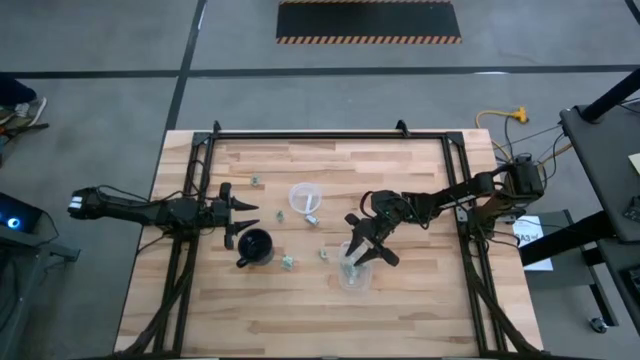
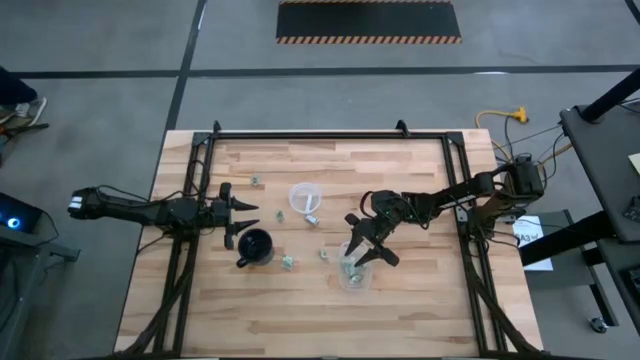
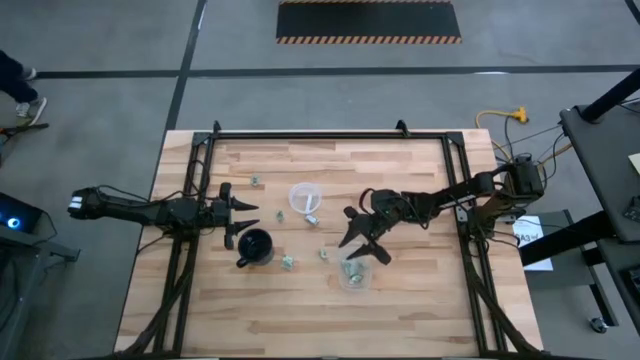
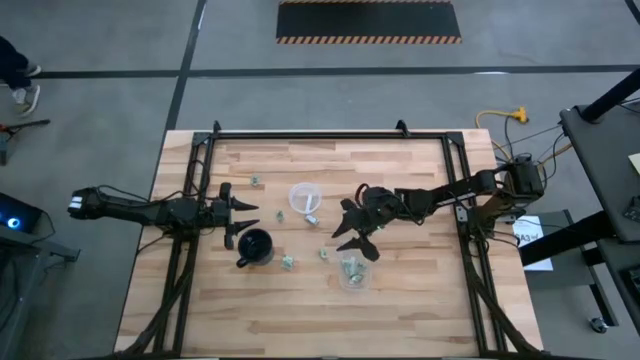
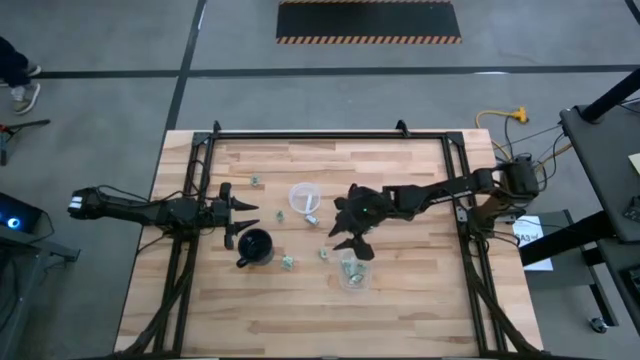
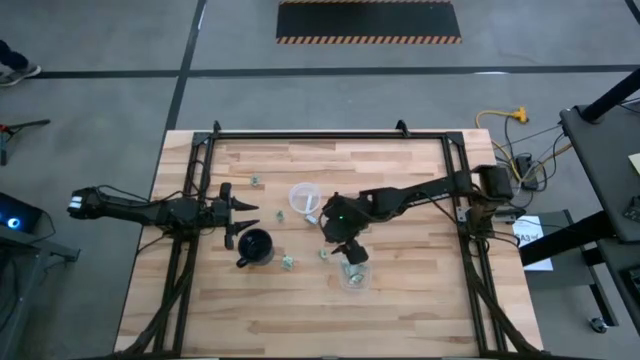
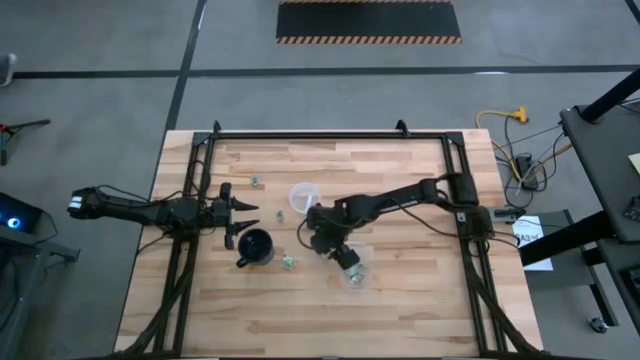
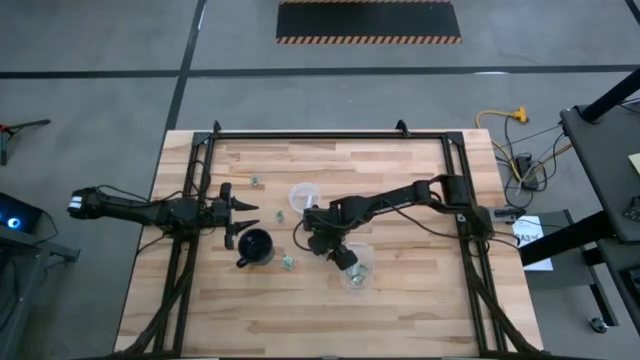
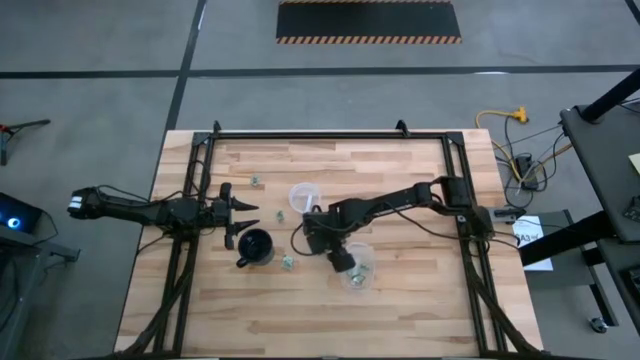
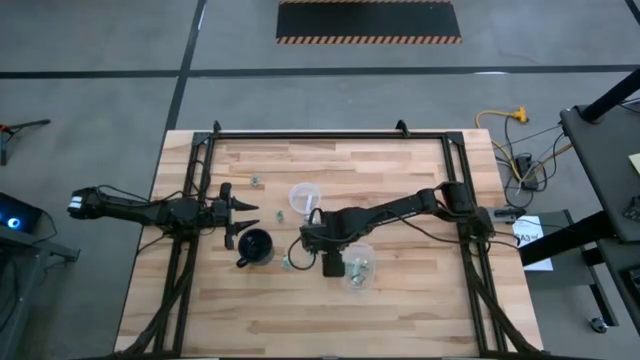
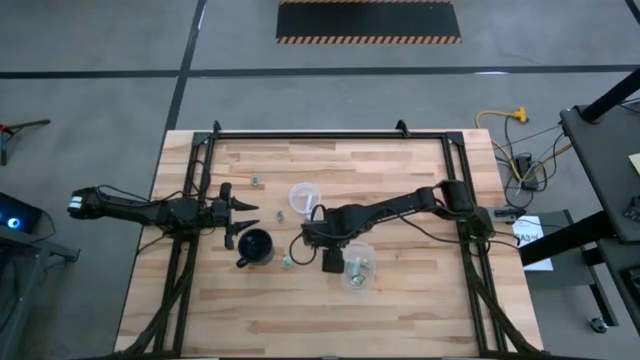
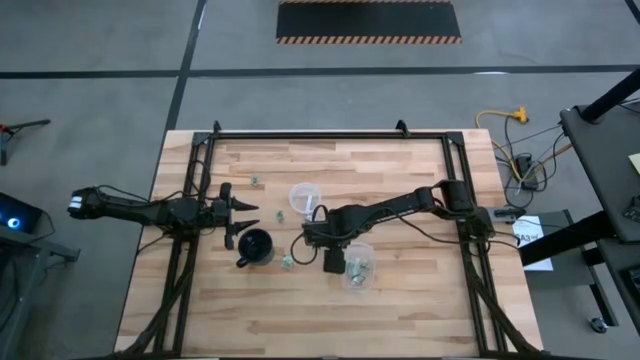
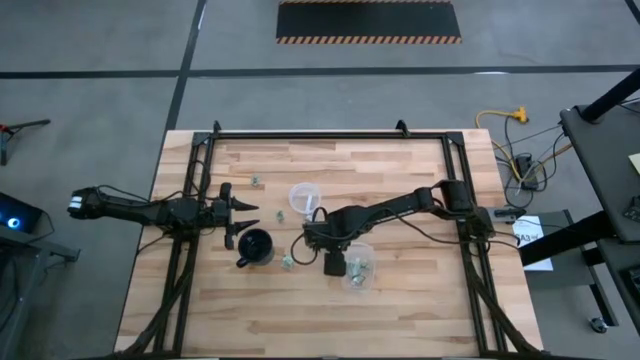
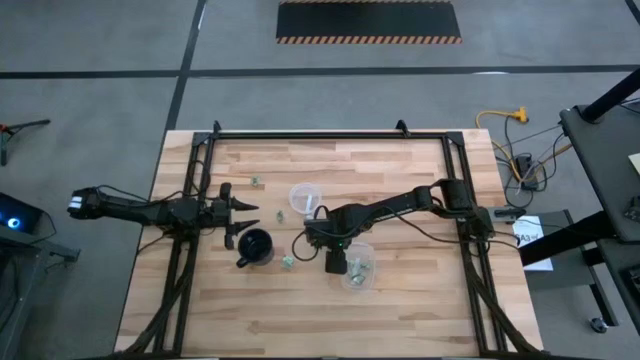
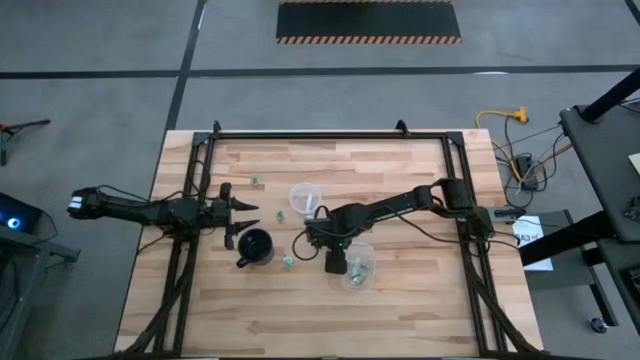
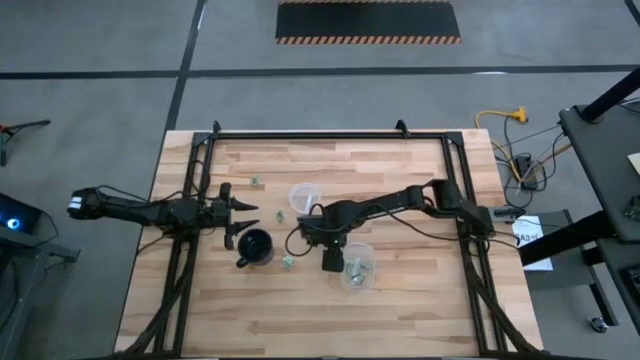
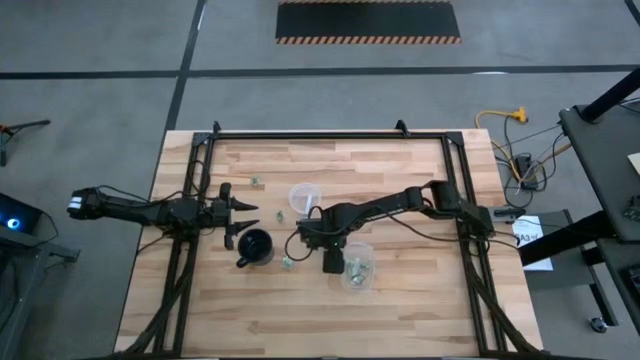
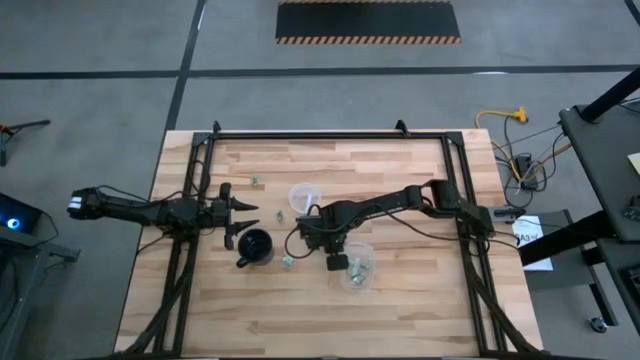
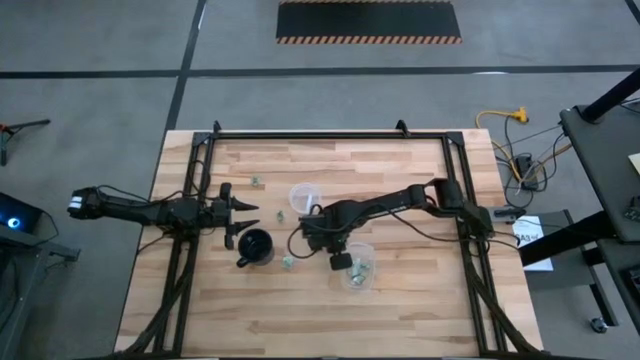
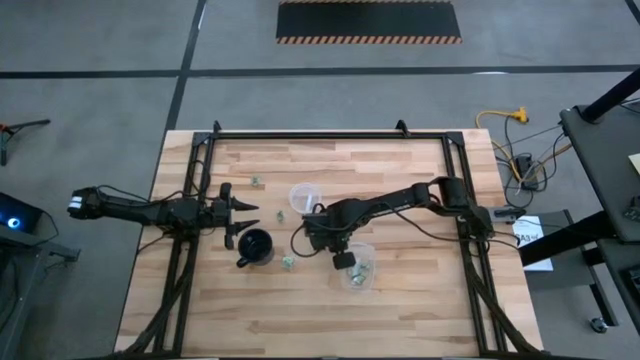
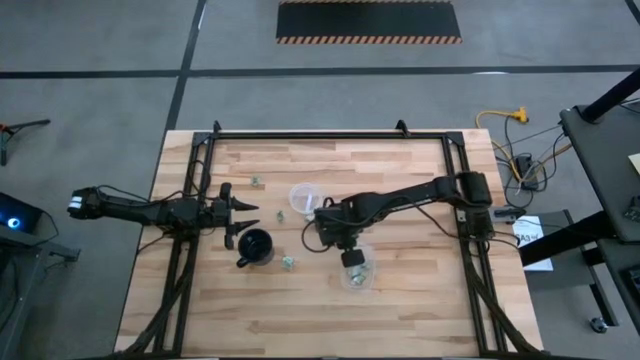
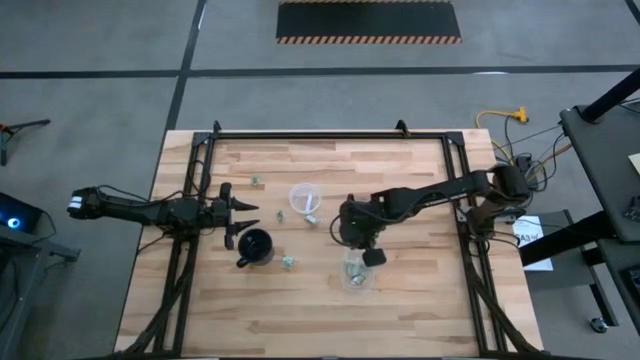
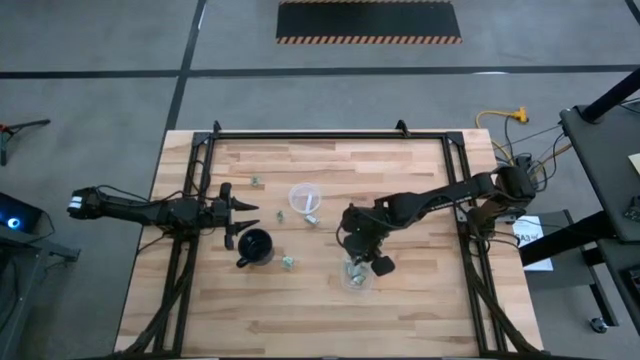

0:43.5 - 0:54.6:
Task: Pick and place items into bin
Put the stevia packet into the rectangular transparent bin

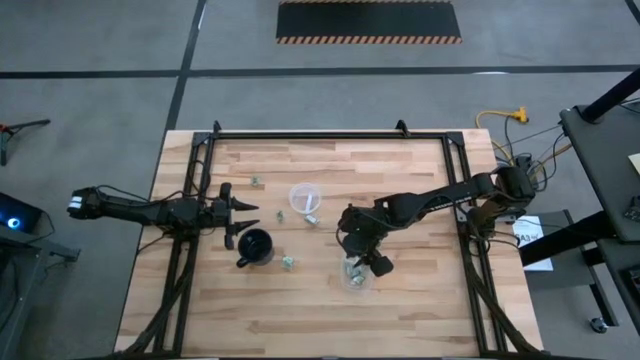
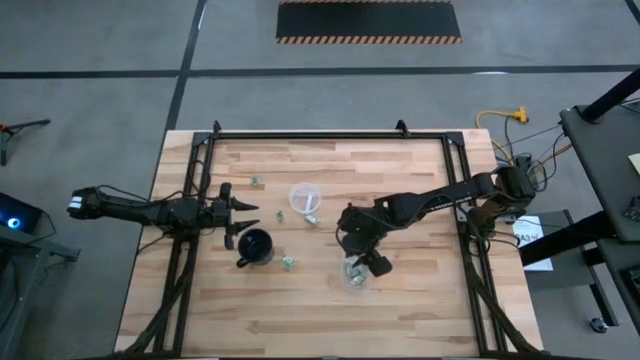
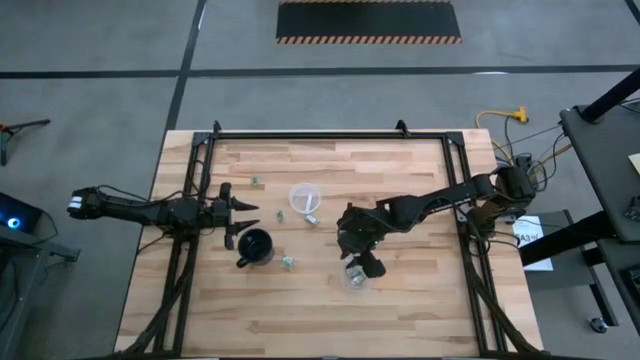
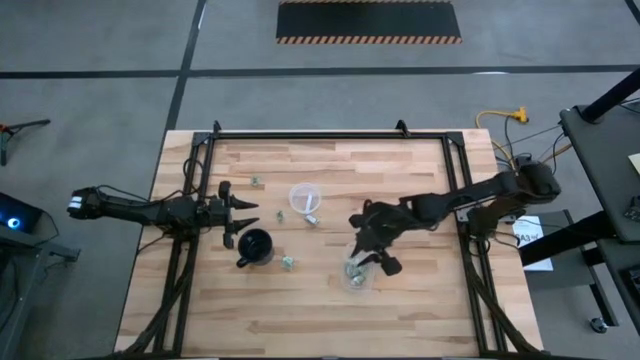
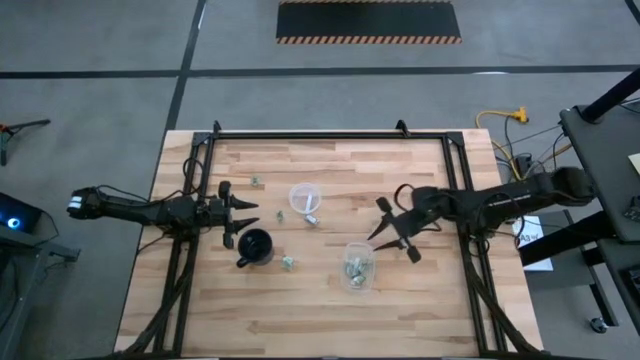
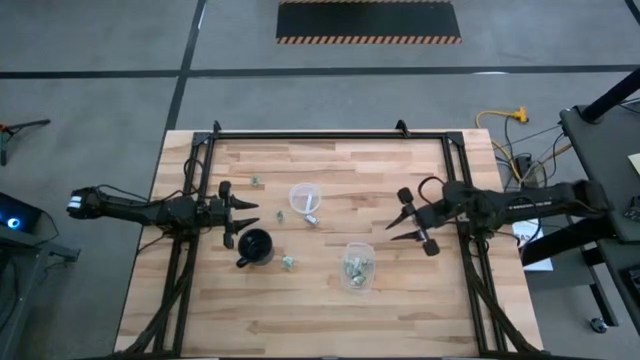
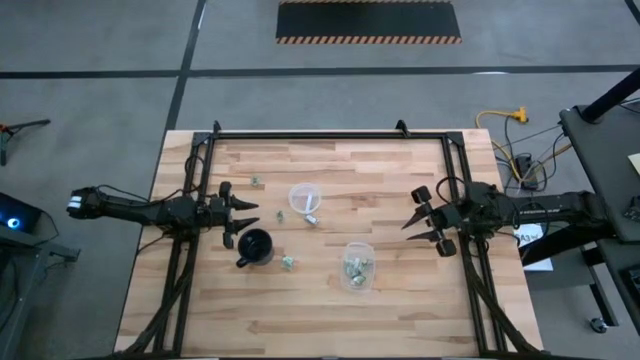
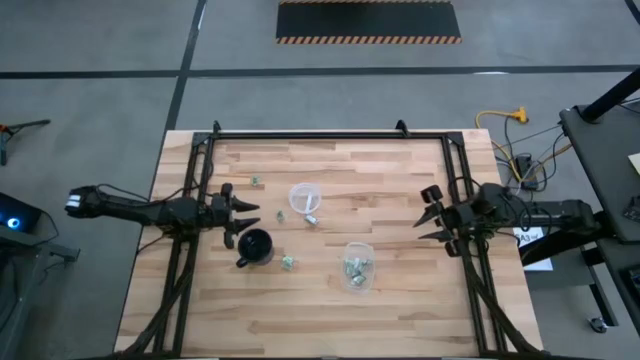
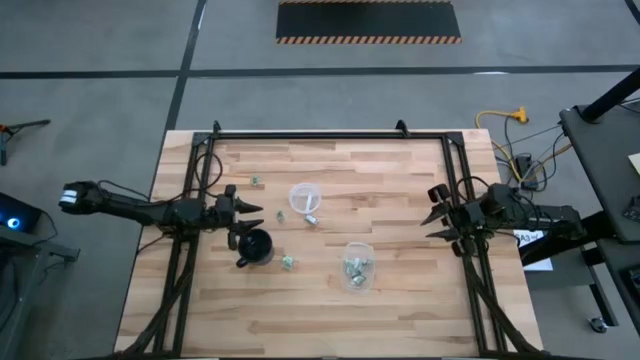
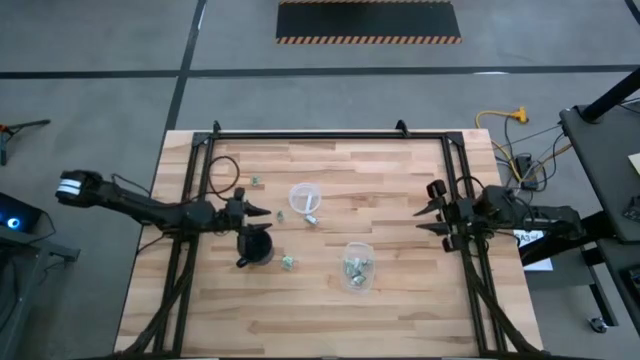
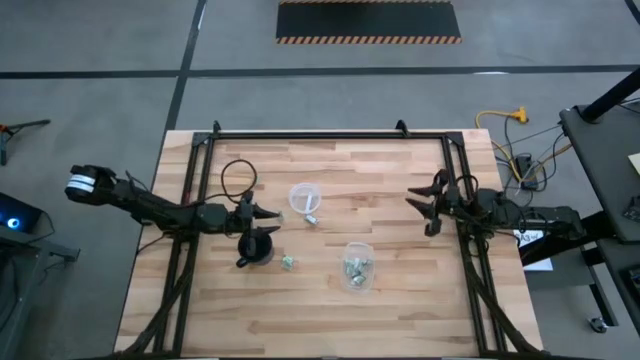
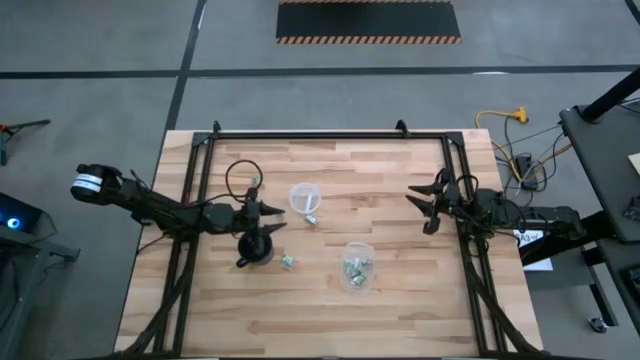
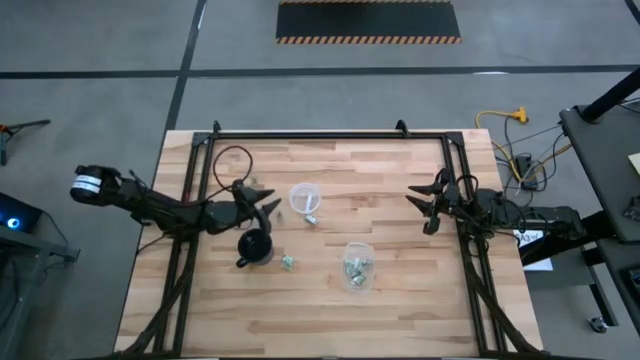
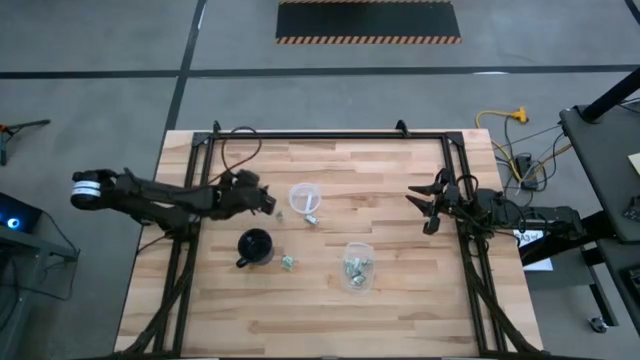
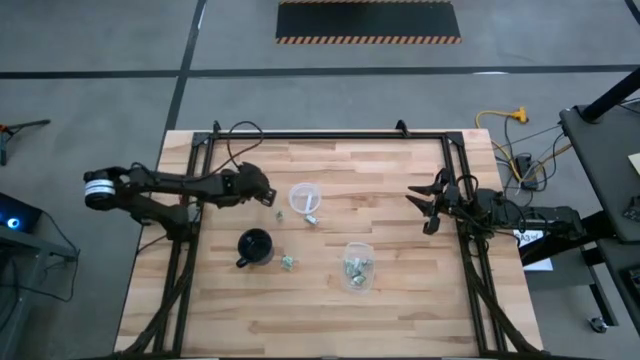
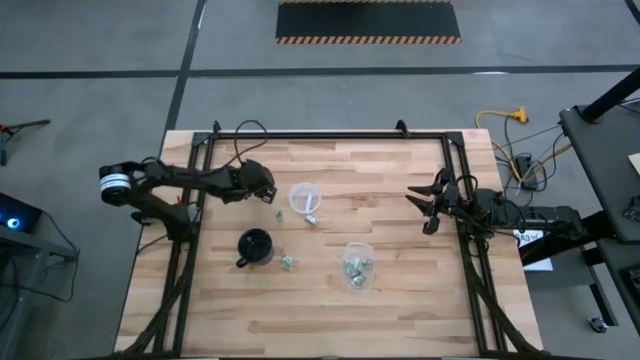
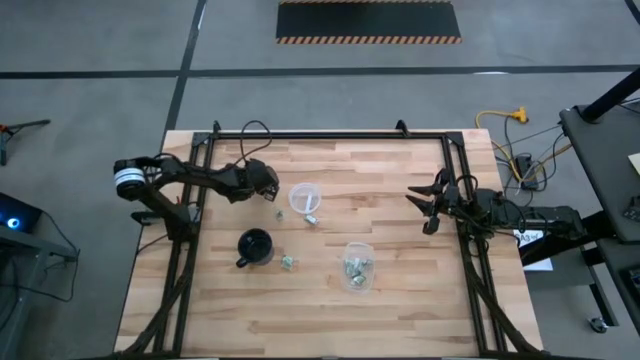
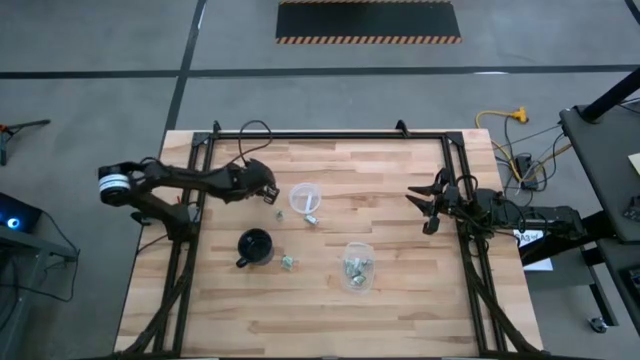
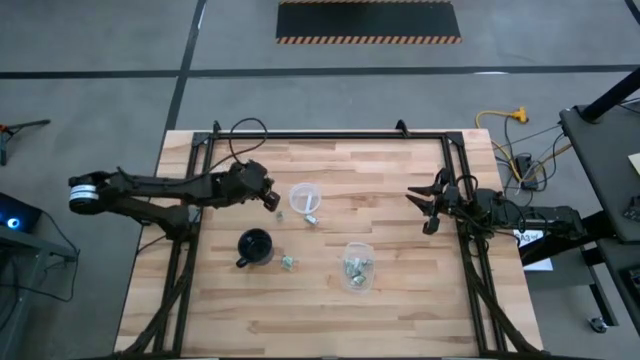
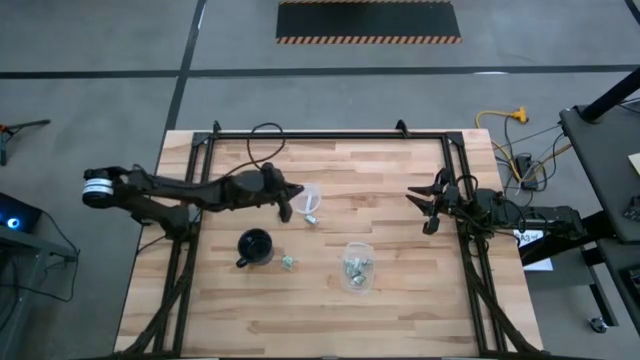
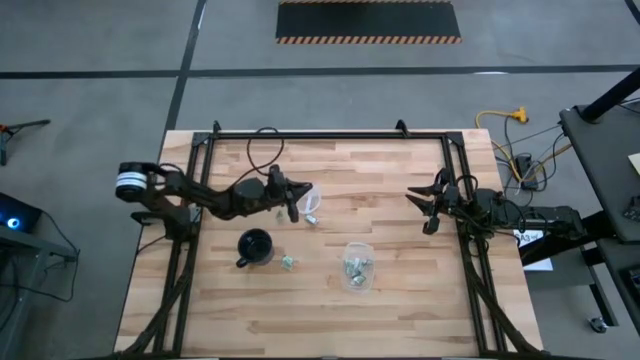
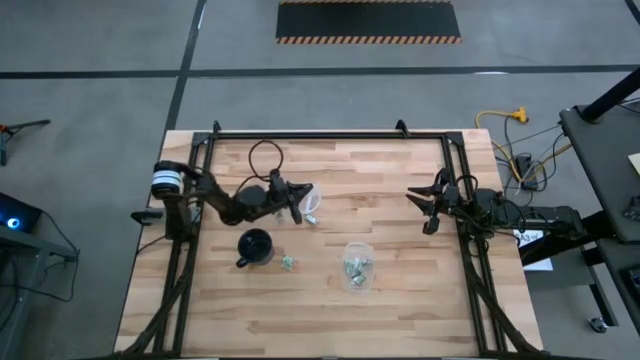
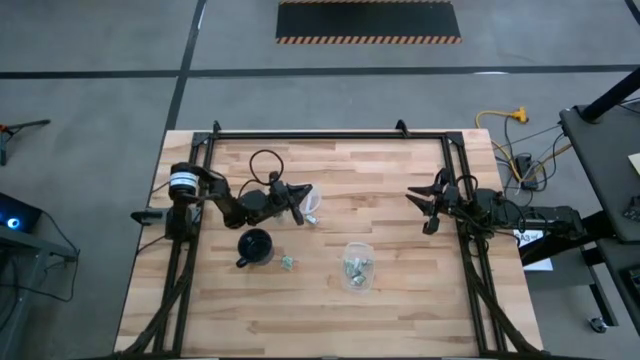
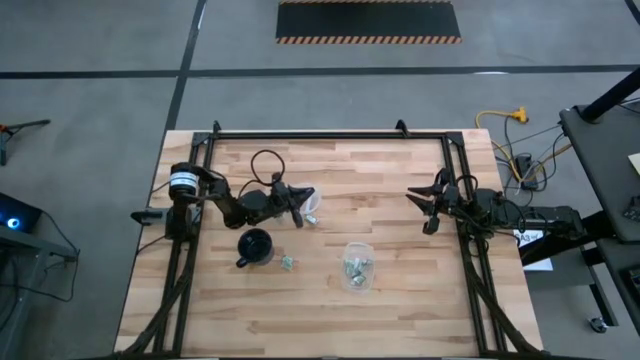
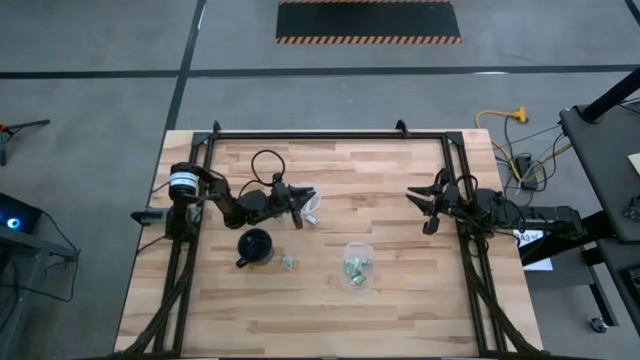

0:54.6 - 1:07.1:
Put the stevia packet into the round transparent bin
